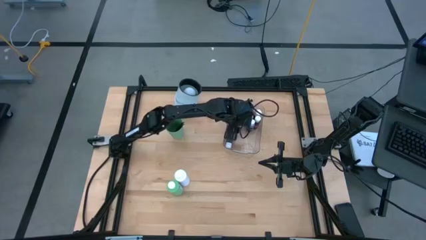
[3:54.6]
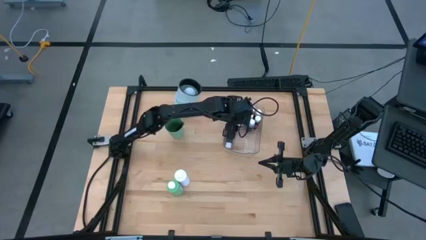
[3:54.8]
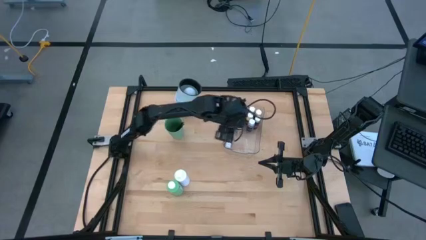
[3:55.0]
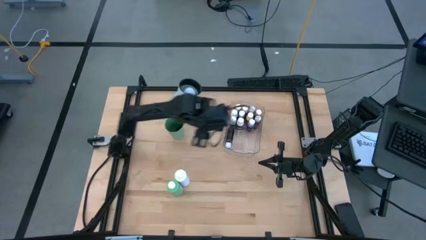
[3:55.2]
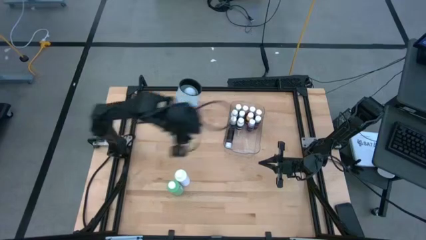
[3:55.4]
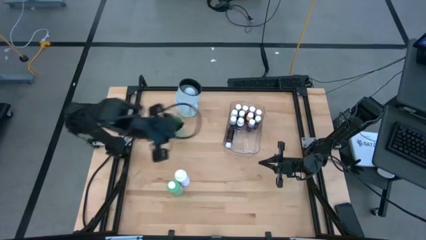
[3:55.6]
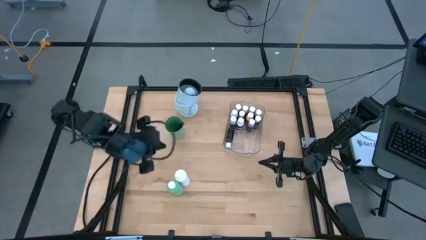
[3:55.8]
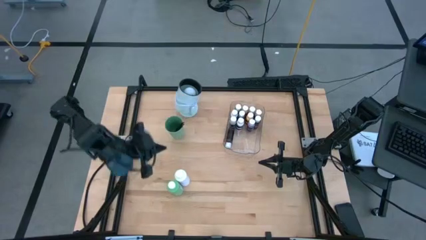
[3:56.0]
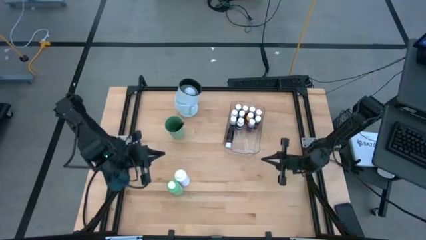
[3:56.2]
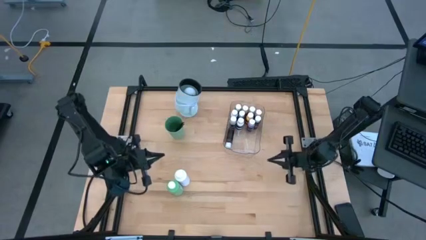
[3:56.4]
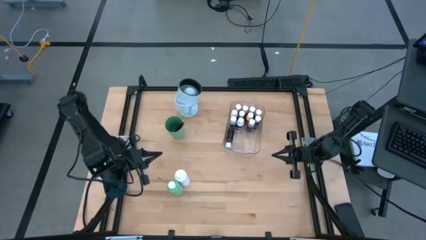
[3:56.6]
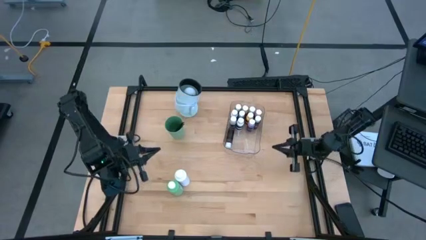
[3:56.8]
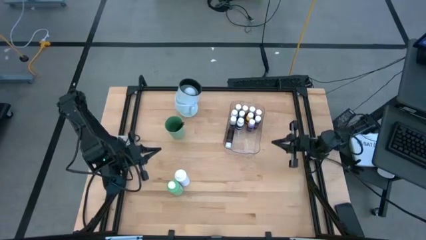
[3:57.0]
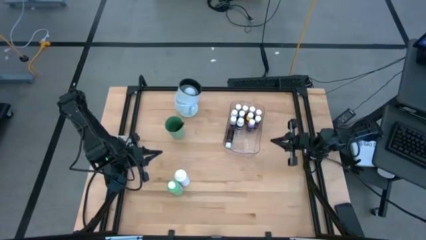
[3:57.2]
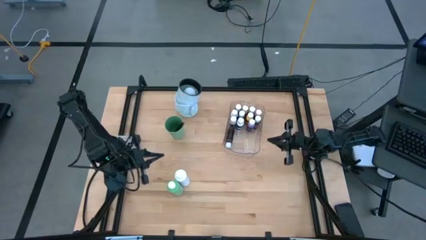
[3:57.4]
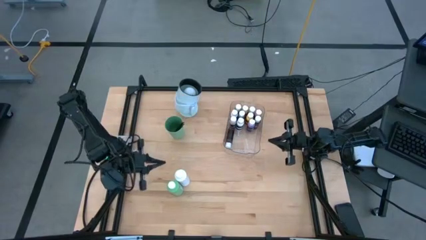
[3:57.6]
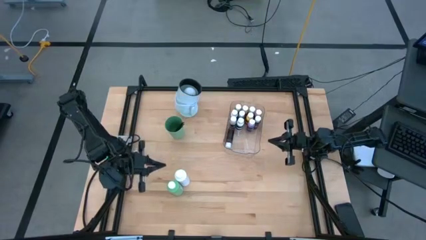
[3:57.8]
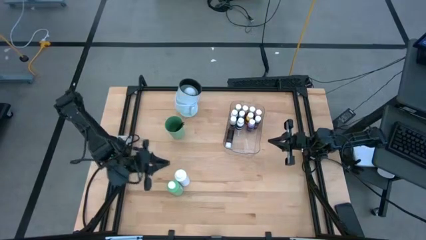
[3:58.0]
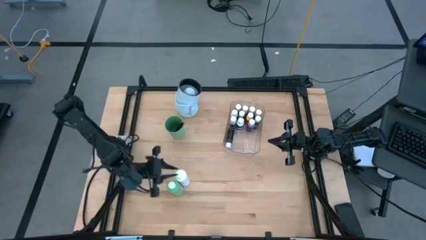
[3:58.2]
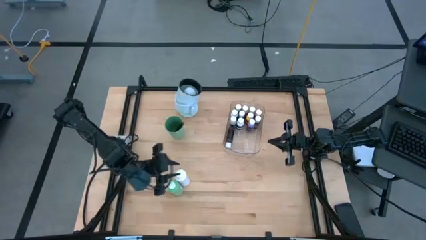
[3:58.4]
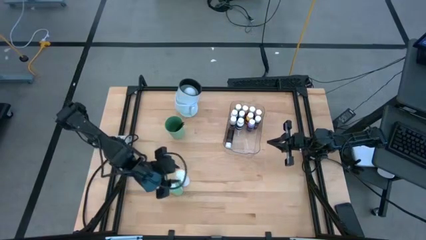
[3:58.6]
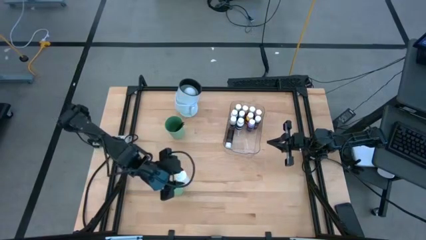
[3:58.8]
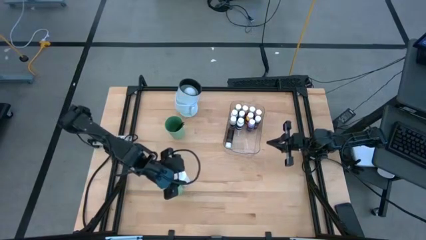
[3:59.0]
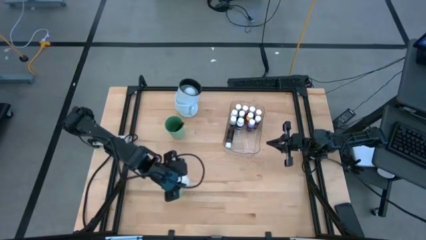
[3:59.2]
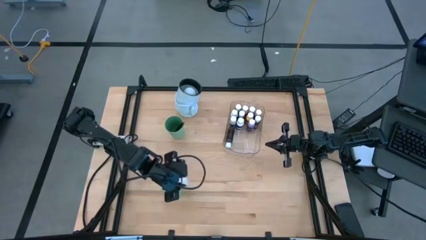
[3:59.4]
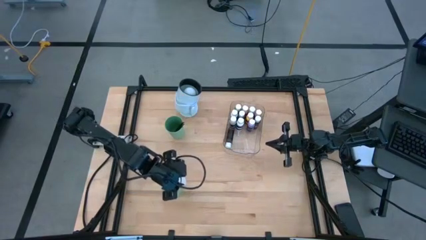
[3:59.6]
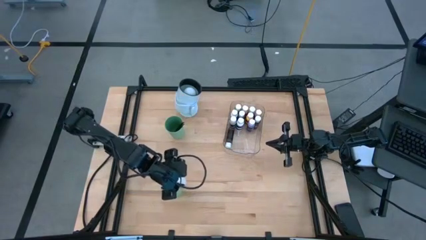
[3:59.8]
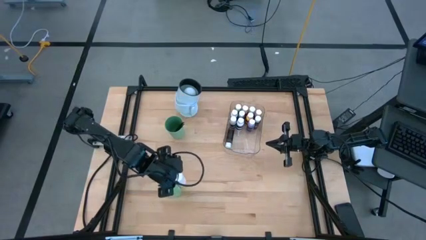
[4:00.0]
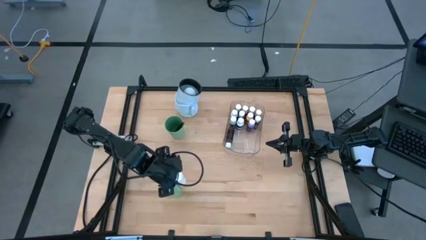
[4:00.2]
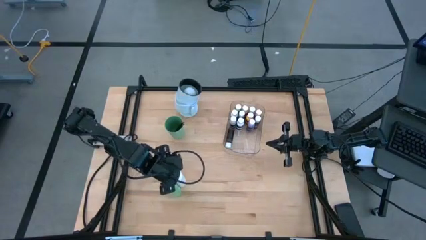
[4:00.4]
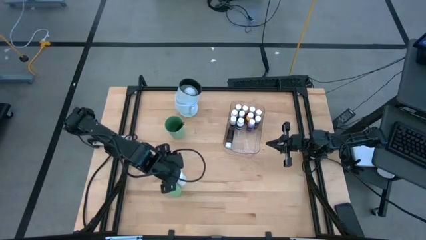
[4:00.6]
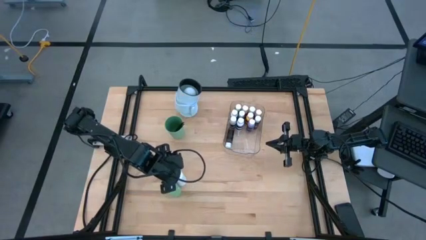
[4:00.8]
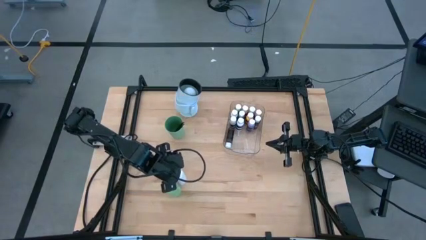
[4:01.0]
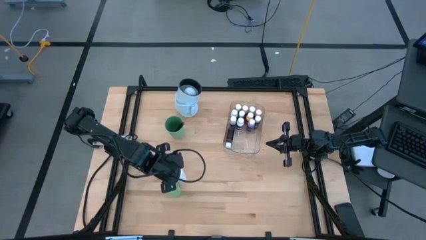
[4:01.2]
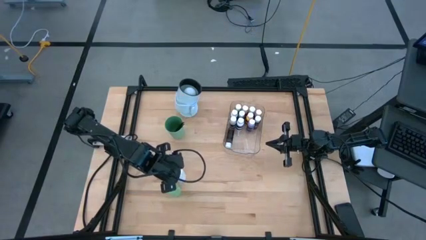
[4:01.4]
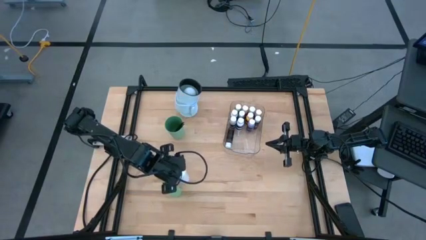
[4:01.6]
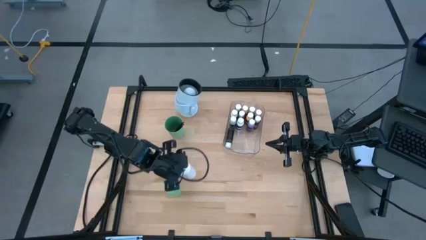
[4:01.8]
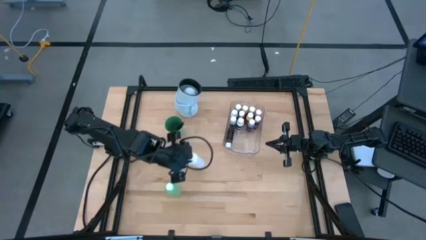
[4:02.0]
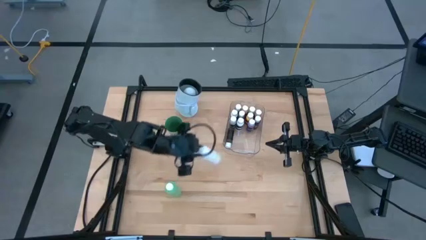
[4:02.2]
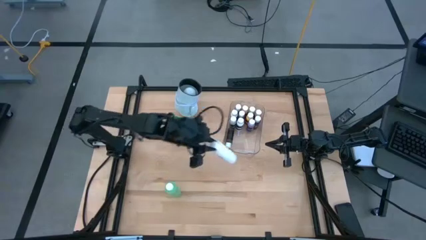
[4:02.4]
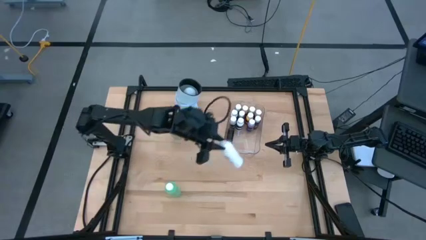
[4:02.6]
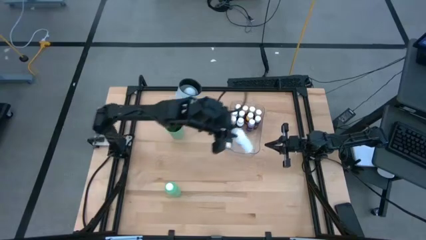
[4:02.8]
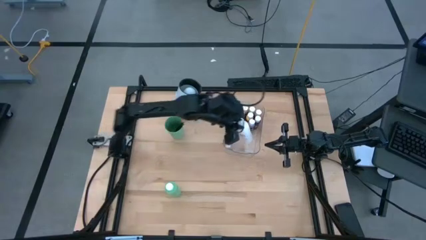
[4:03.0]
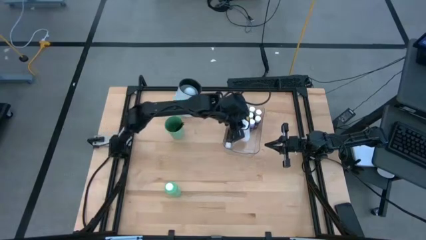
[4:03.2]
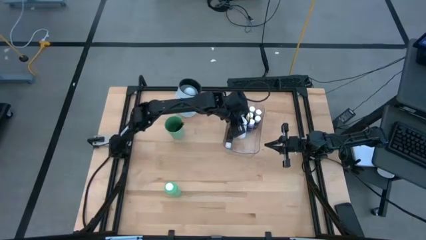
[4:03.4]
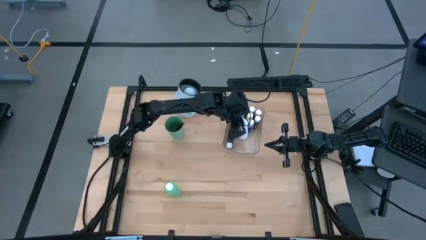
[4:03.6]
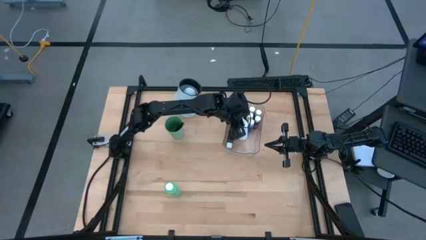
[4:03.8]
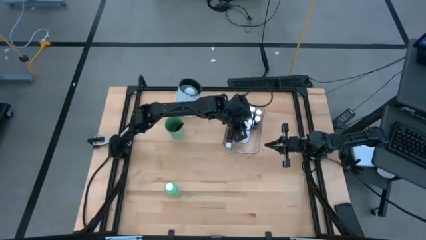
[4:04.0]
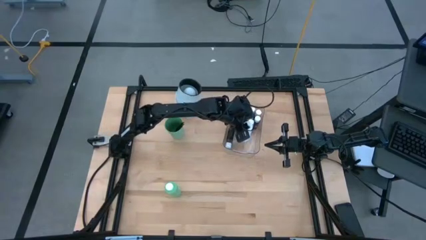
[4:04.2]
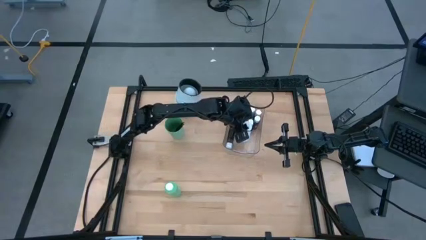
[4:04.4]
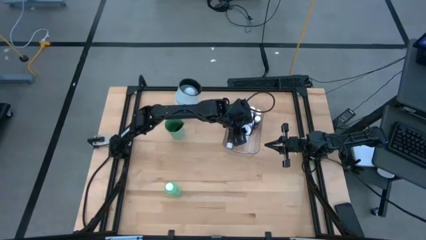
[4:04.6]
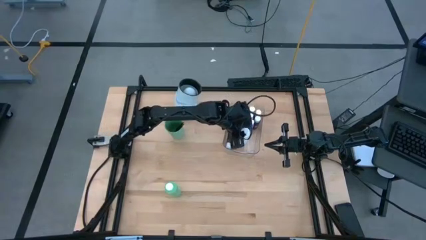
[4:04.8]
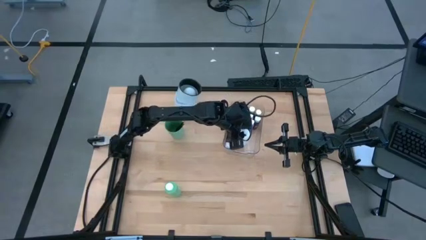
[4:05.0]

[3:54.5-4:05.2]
Task: Pick & Place Paint Supplies
Put the large white paint bottle into the transparent bin

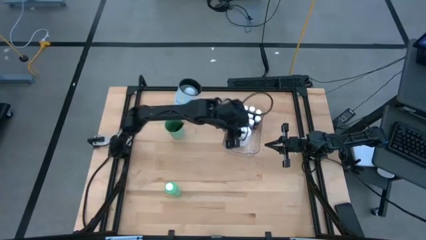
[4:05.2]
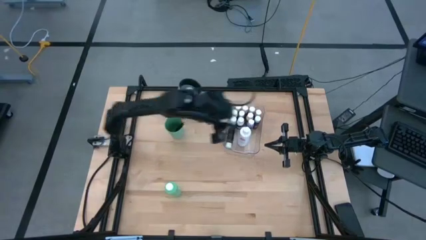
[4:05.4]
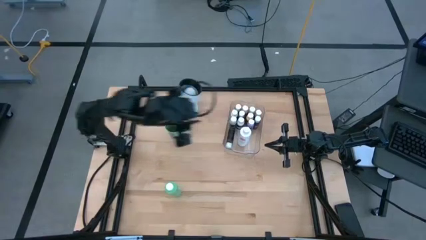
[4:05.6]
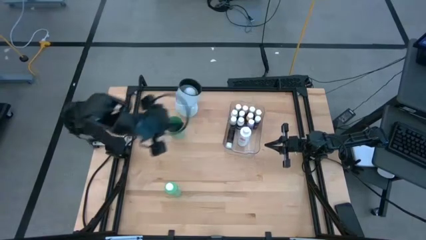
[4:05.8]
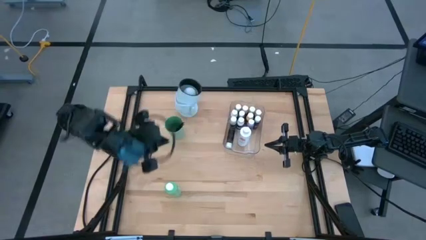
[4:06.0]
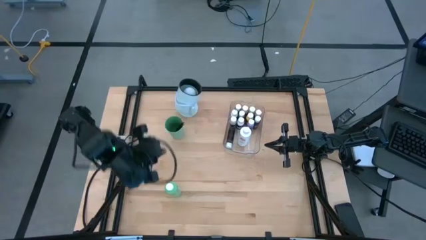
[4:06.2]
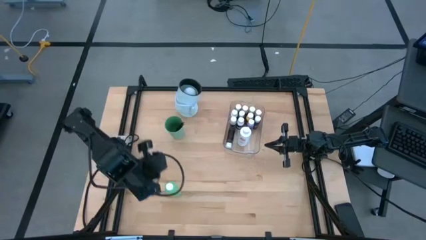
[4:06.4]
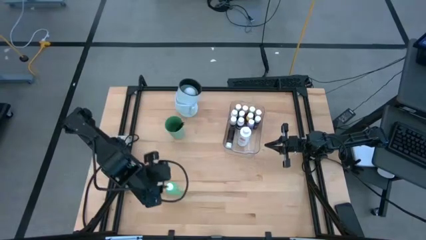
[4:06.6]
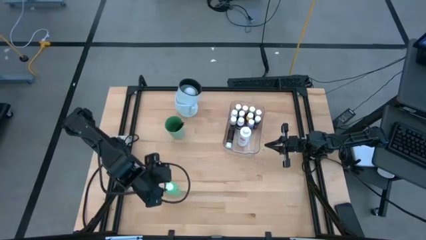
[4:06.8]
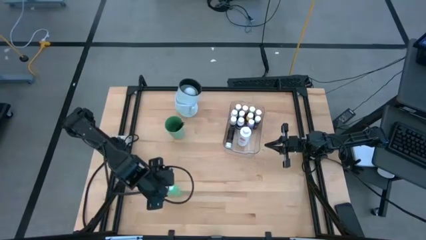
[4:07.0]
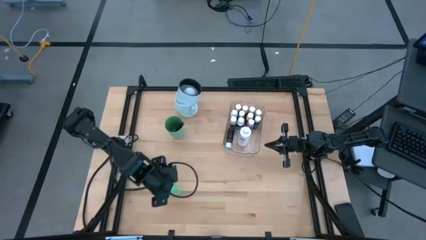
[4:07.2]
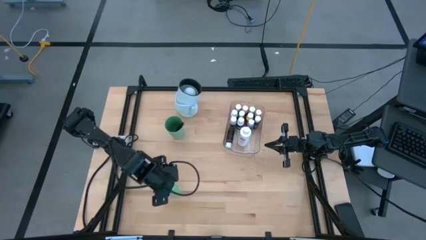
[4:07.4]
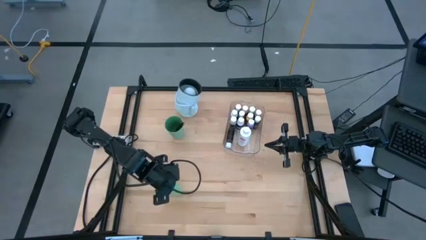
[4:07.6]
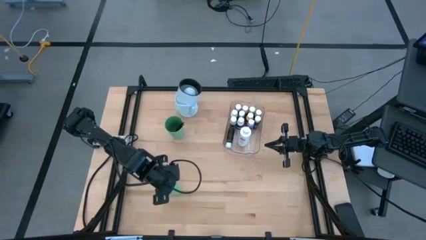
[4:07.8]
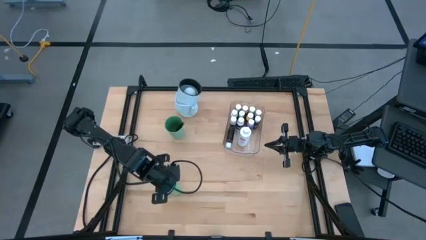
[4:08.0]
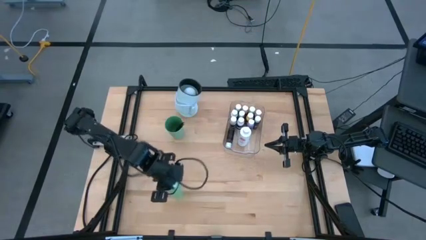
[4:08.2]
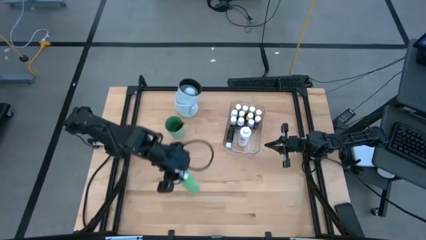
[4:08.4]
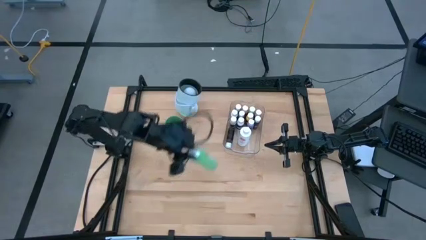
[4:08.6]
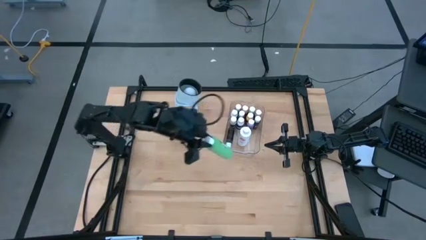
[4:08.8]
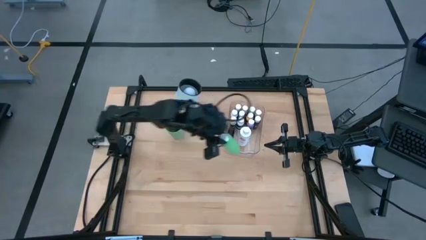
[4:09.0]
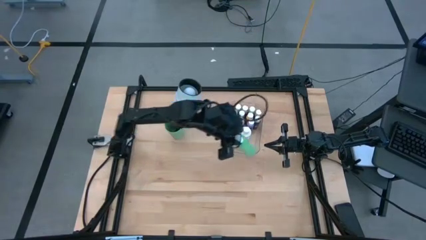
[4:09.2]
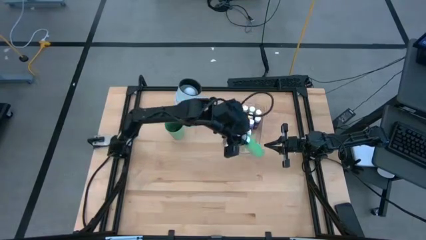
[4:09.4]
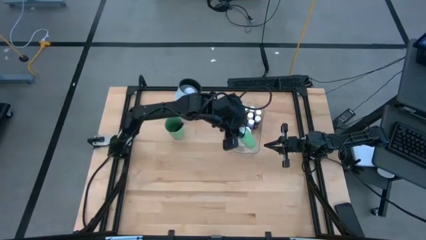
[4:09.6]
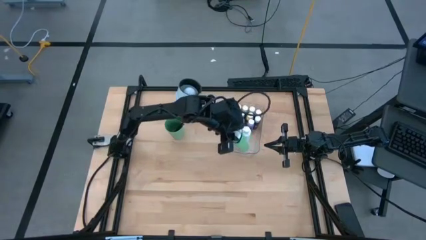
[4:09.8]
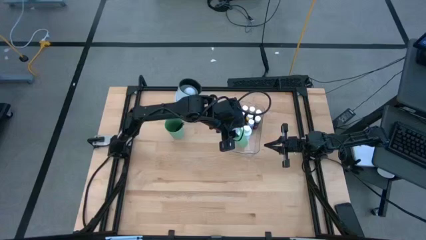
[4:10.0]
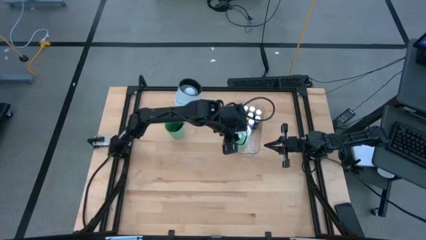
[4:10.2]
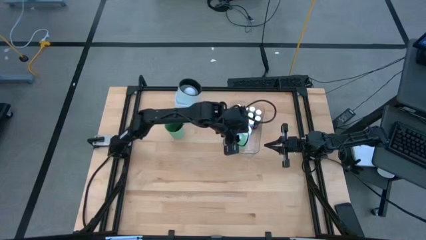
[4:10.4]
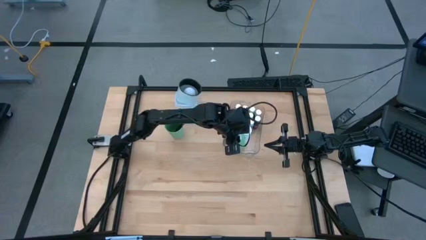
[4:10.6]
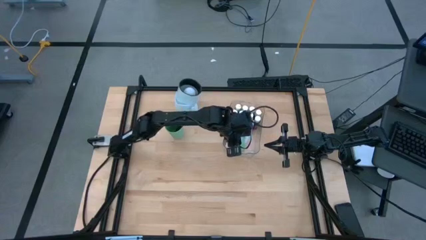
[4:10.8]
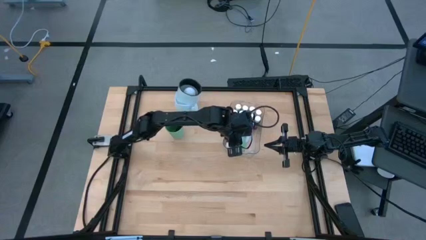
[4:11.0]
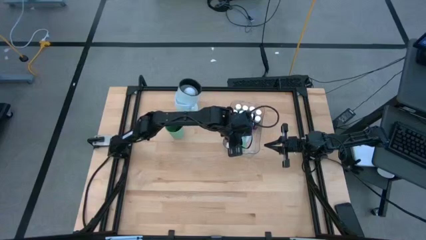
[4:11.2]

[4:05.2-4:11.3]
Put the large green paint bottle into the transparent bin
